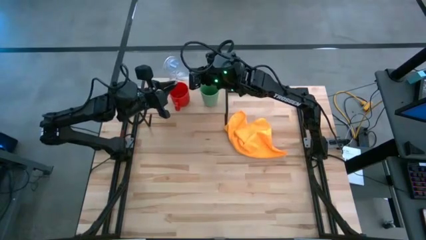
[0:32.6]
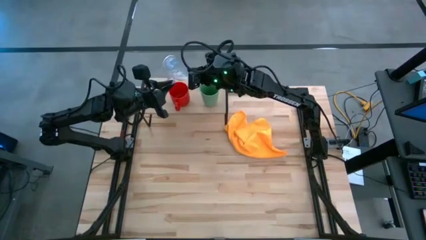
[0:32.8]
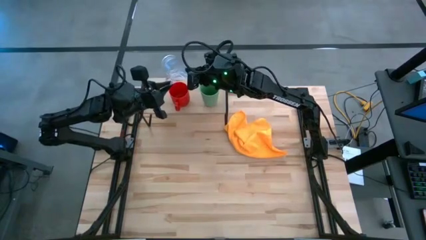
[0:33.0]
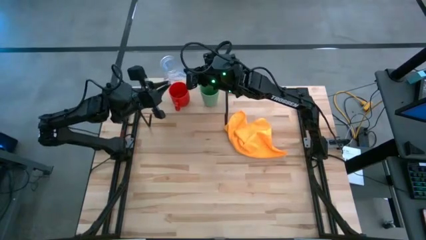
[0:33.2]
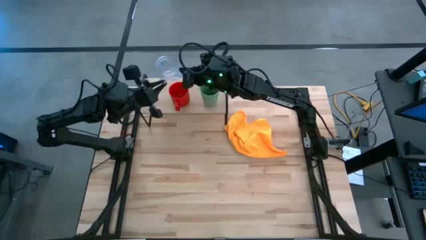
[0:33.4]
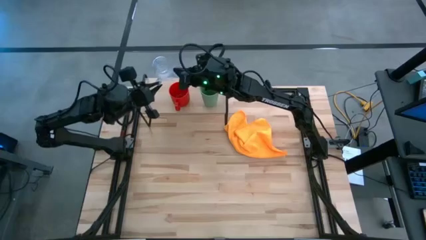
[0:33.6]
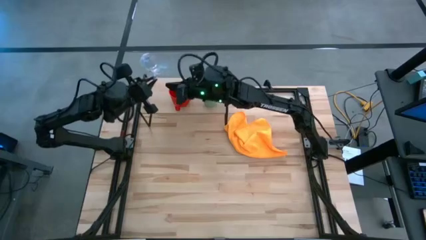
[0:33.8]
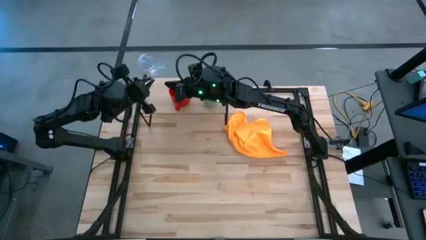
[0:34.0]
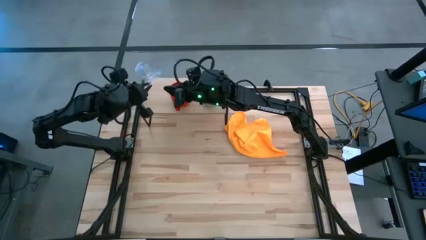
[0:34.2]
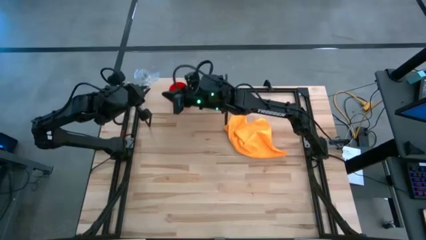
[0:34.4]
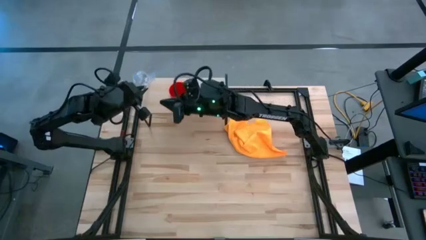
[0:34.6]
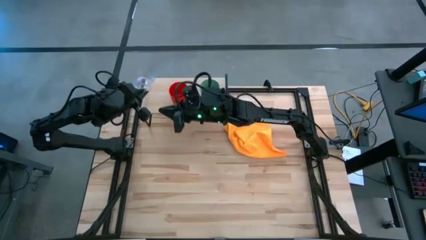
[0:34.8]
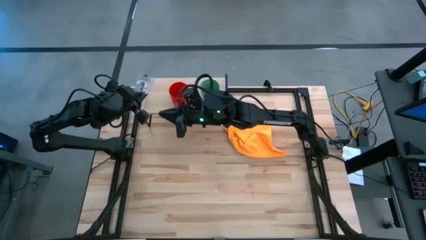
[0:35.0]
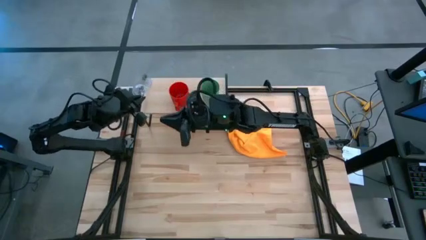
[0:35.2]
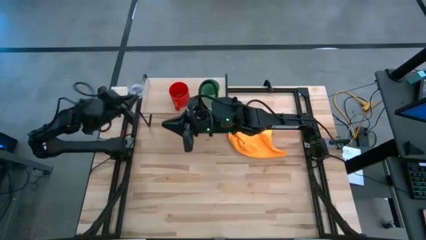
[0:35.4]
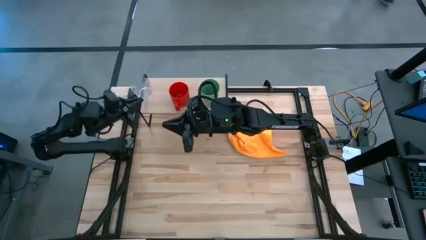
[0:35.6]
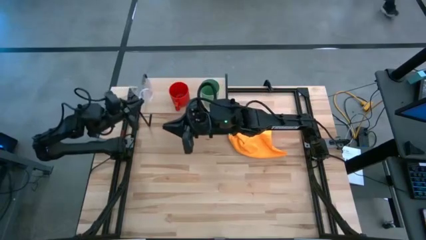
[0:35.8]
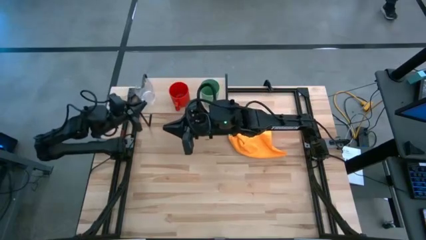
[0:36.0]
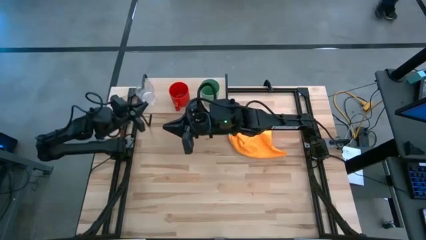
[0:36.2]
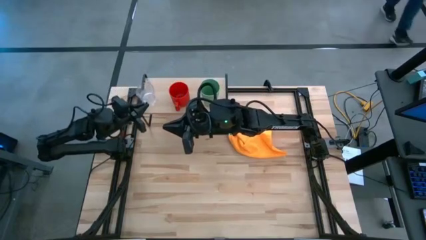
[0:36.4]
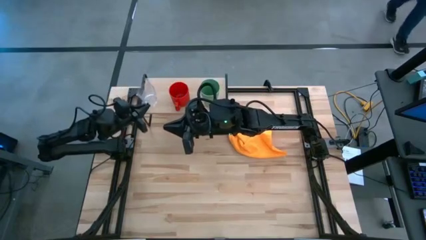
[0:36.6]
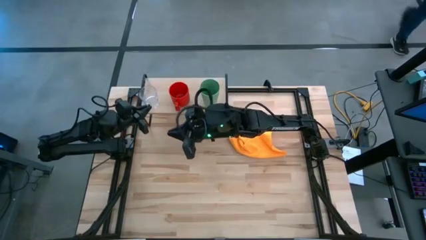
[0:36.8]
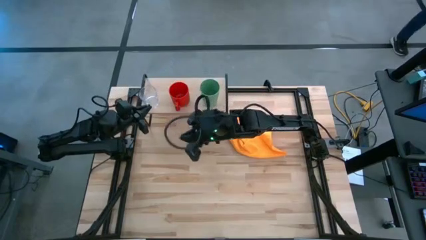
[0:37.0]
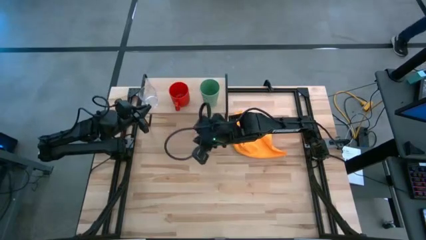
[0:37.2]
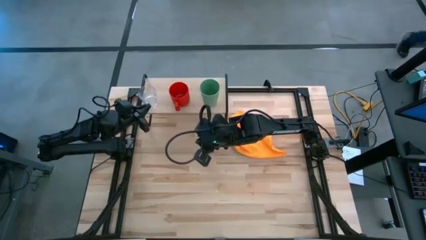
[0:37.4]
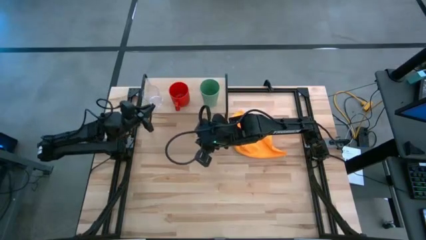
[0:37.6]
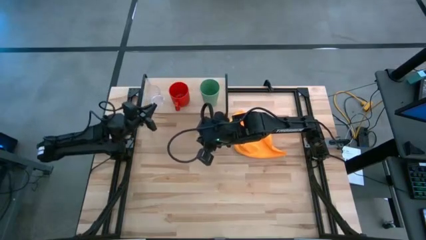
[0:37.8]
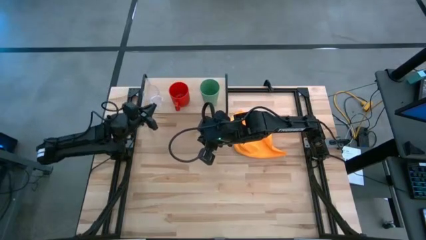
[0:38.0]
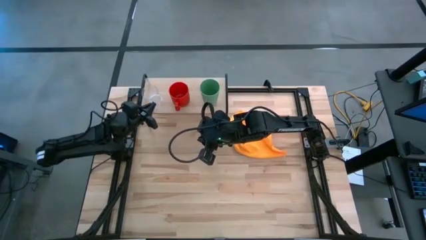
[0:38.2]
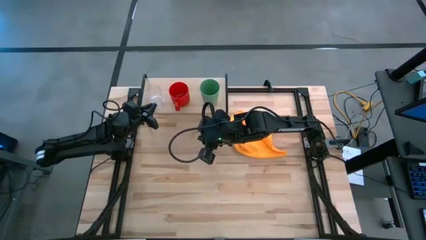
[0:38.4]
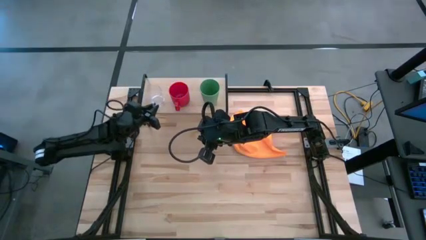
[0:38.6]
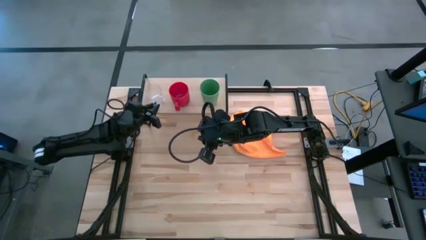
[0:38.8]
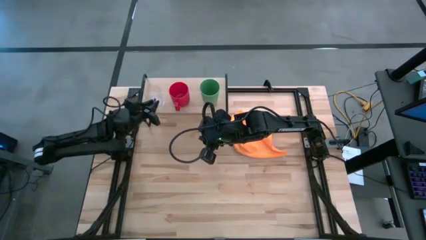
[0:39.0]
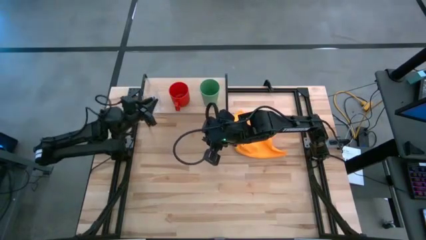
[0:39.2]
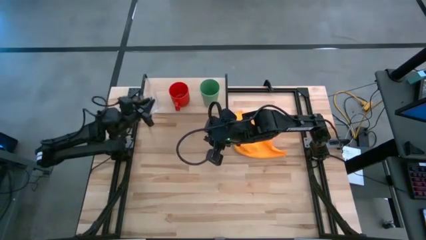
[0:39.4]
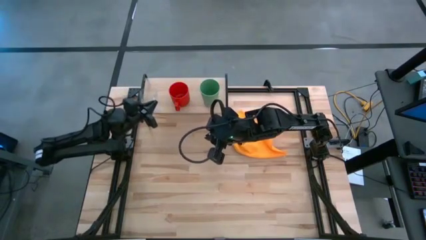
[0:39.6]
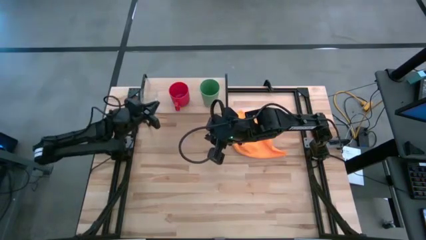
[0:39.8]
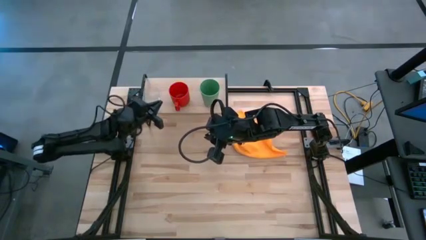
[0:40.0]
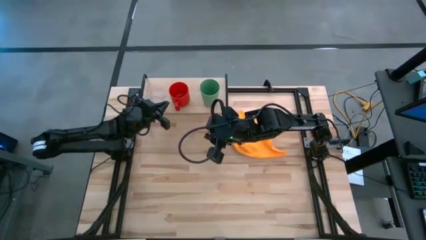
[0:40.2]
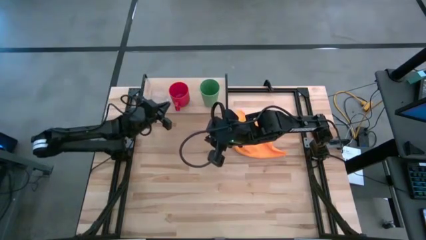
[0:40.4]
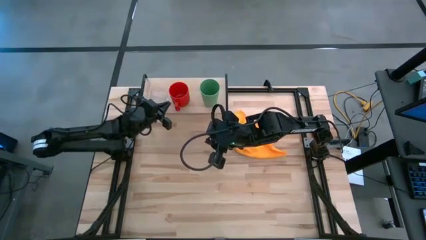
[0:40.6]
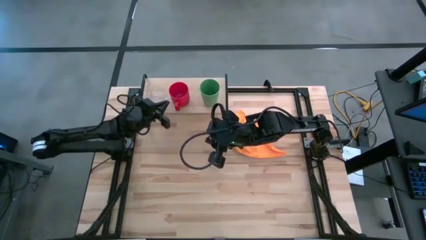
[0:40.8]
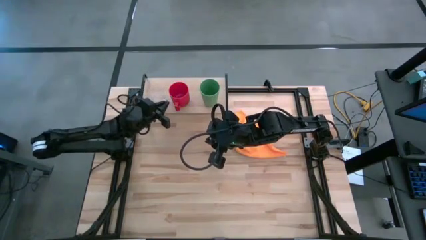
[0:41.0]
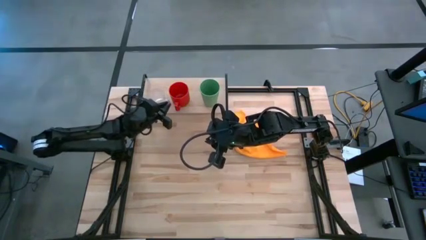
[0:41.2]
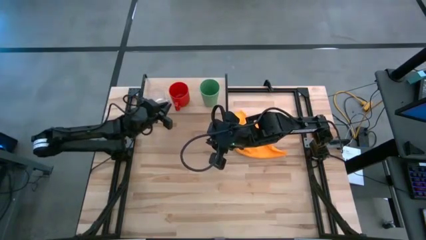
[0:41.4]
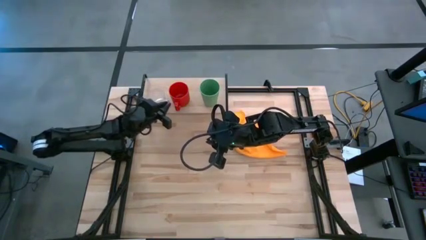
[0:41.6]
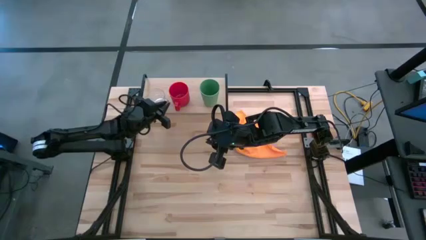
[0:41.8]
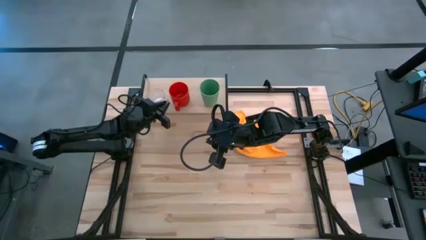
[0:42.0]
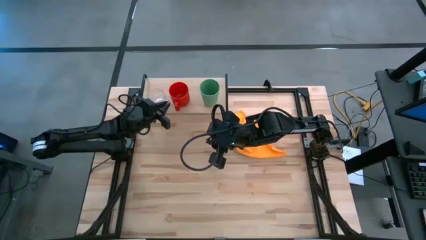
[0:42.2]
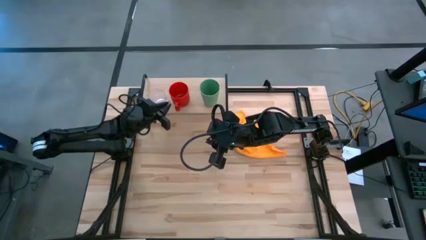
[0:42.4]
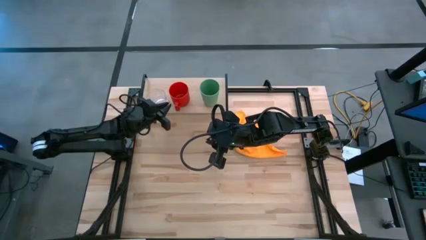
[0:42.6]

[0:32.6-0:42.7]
Task: Stack small to large cups/mugs on shelf
Put the transparent mug on the shelf
